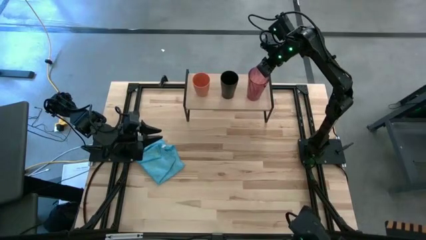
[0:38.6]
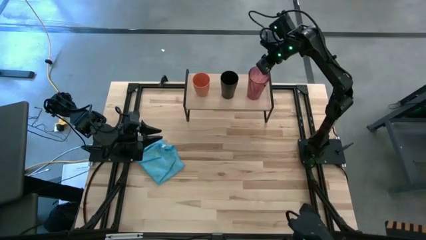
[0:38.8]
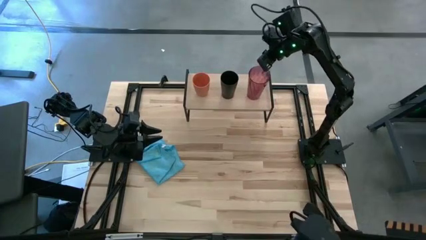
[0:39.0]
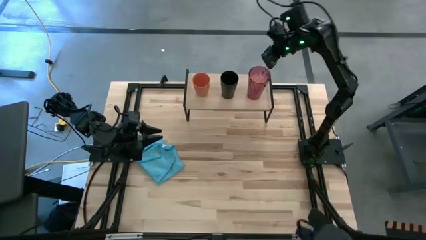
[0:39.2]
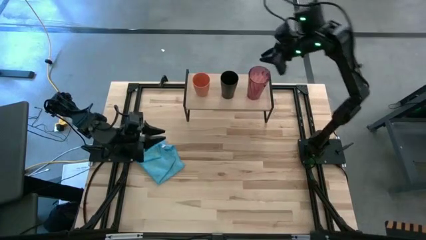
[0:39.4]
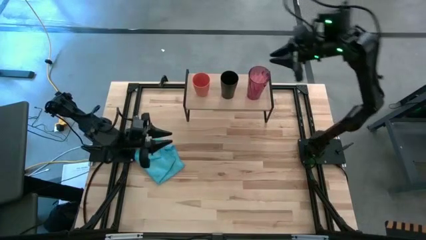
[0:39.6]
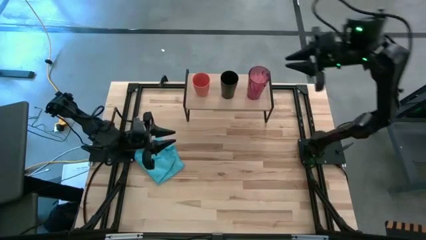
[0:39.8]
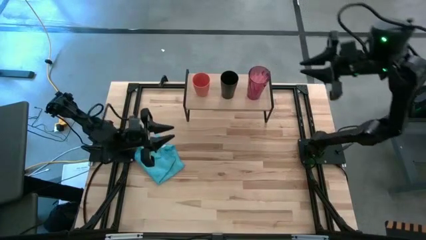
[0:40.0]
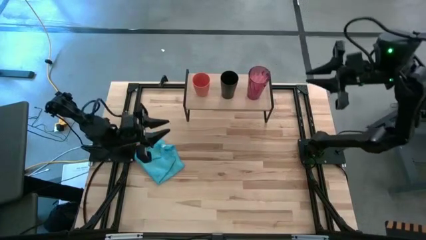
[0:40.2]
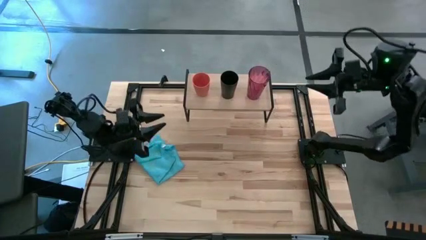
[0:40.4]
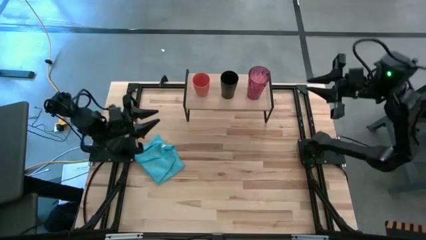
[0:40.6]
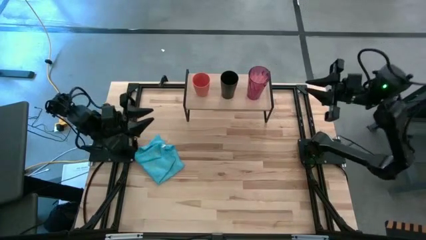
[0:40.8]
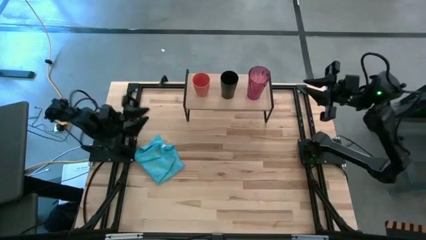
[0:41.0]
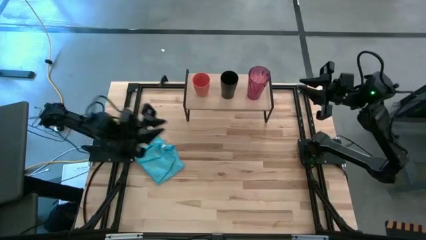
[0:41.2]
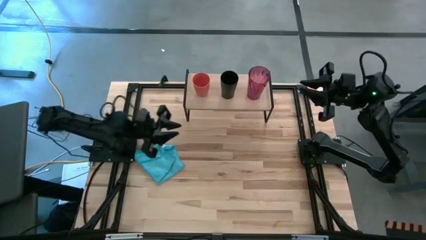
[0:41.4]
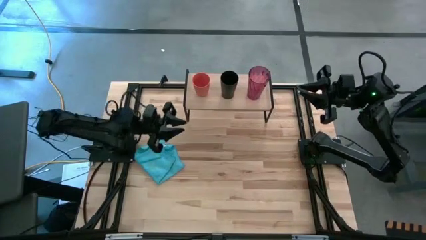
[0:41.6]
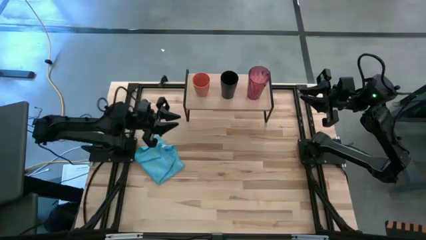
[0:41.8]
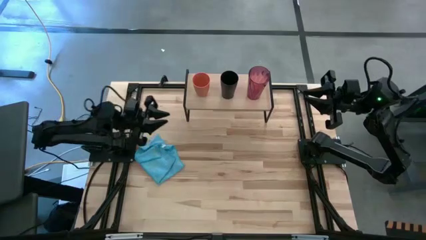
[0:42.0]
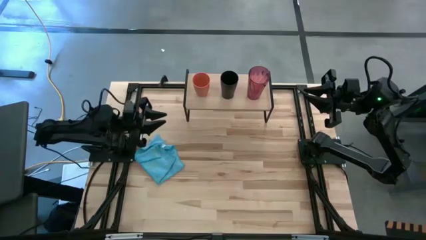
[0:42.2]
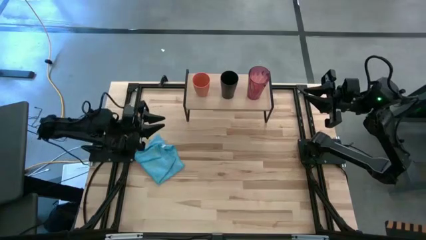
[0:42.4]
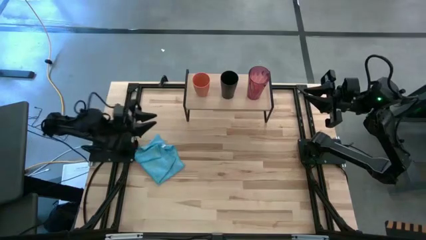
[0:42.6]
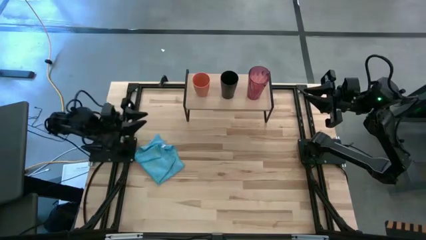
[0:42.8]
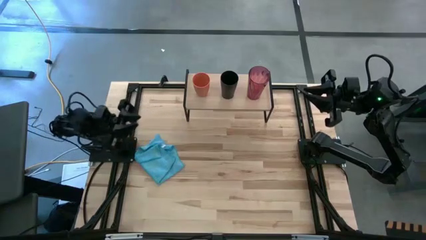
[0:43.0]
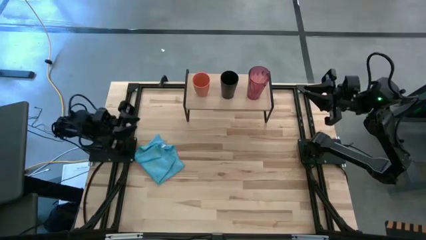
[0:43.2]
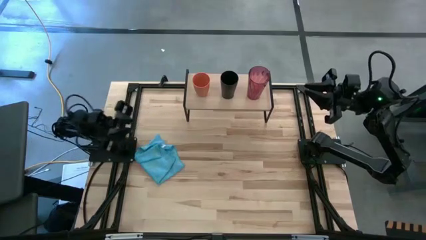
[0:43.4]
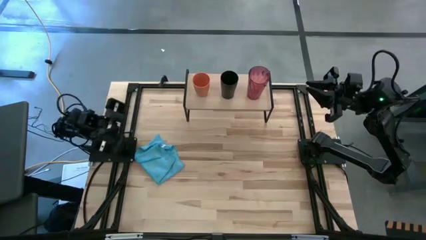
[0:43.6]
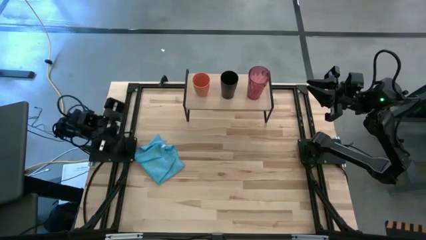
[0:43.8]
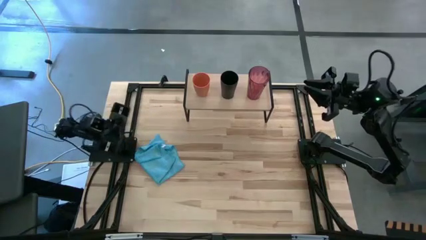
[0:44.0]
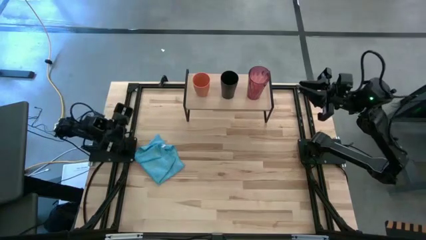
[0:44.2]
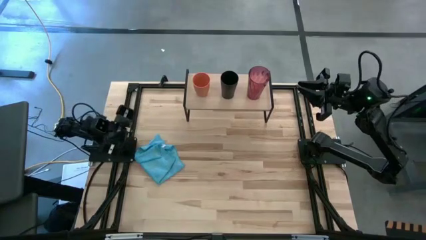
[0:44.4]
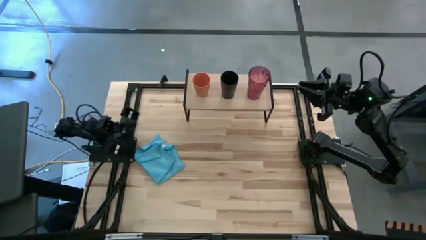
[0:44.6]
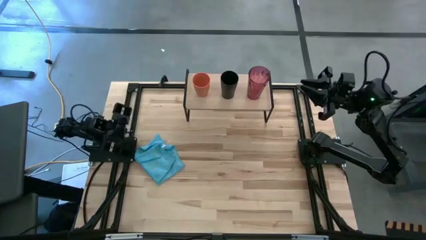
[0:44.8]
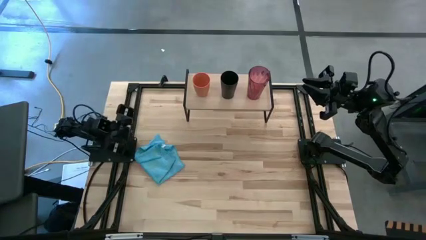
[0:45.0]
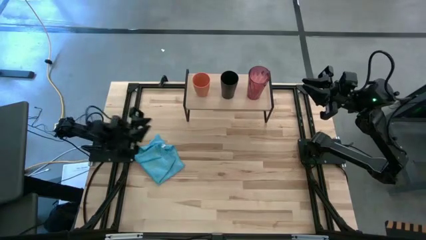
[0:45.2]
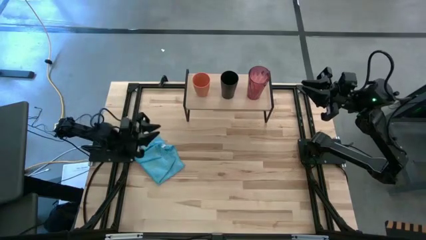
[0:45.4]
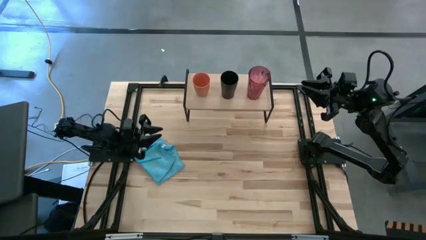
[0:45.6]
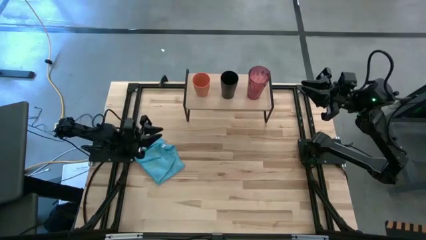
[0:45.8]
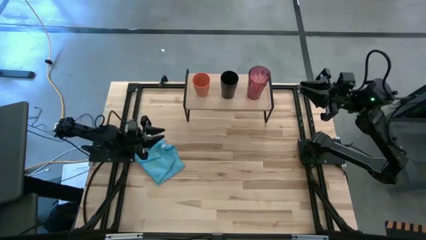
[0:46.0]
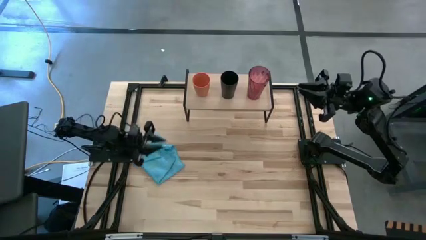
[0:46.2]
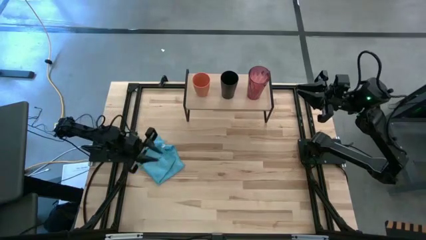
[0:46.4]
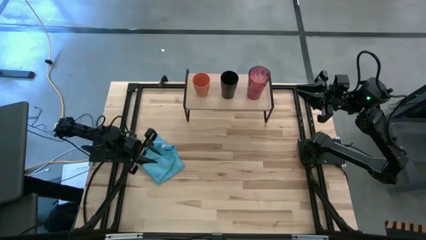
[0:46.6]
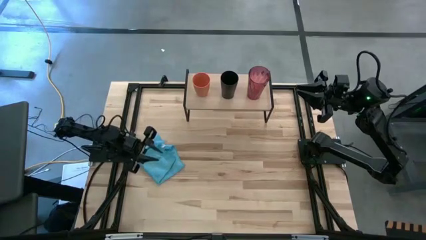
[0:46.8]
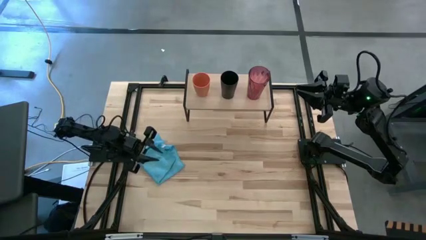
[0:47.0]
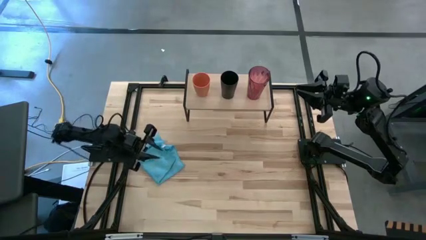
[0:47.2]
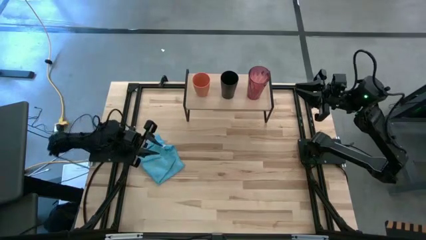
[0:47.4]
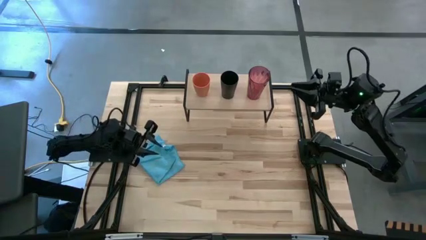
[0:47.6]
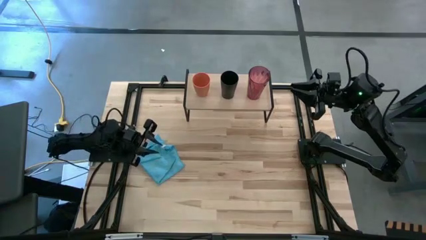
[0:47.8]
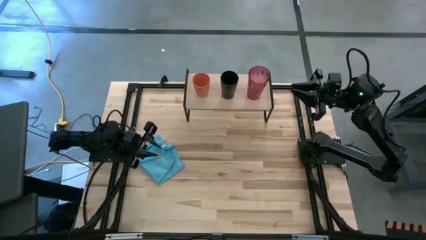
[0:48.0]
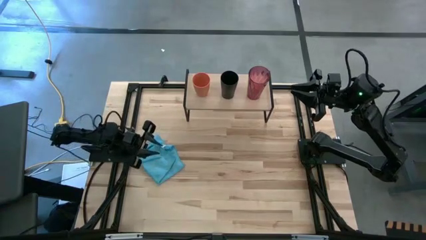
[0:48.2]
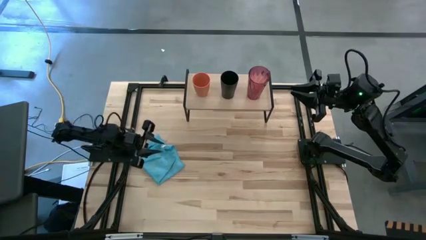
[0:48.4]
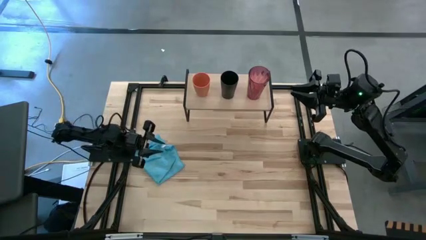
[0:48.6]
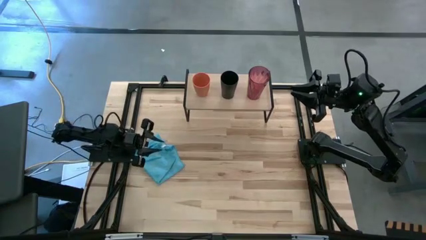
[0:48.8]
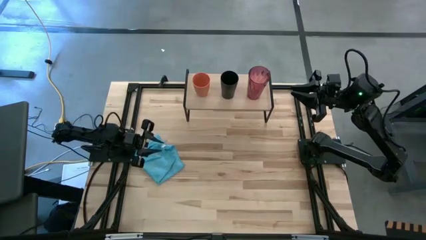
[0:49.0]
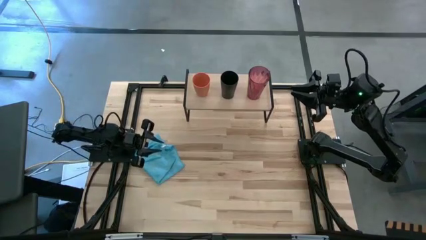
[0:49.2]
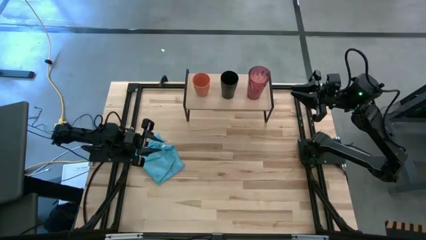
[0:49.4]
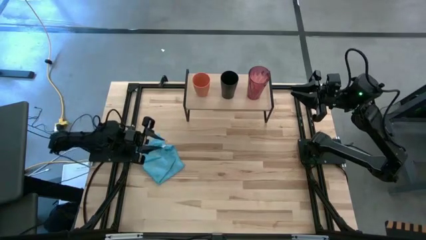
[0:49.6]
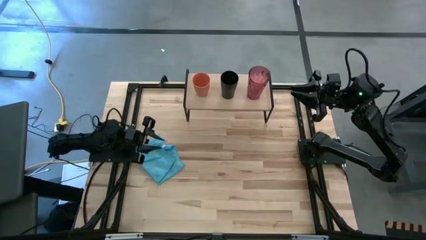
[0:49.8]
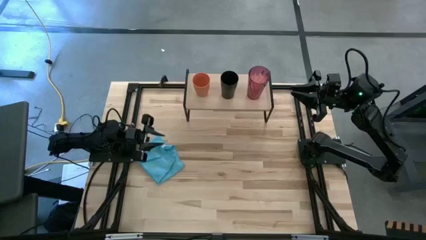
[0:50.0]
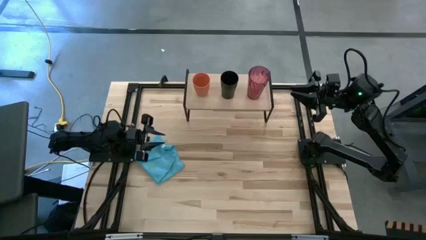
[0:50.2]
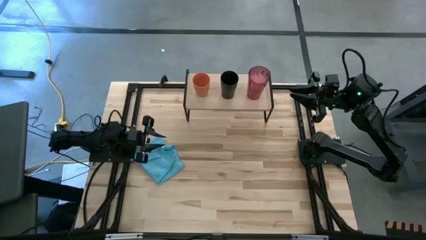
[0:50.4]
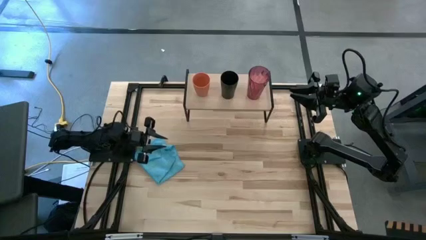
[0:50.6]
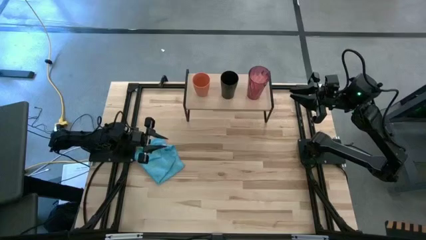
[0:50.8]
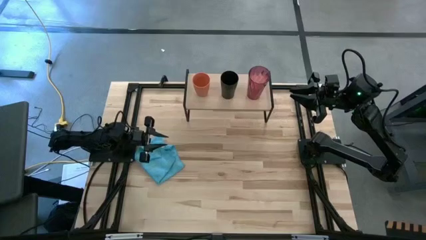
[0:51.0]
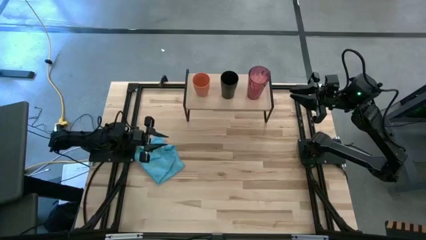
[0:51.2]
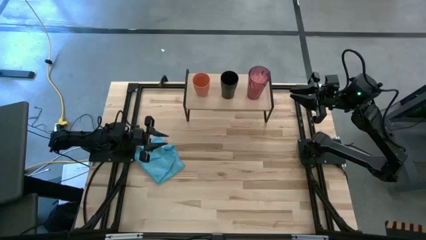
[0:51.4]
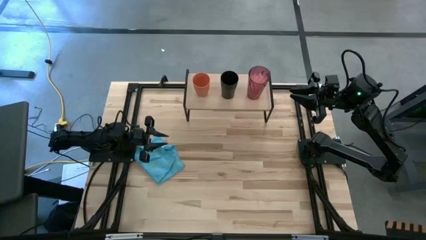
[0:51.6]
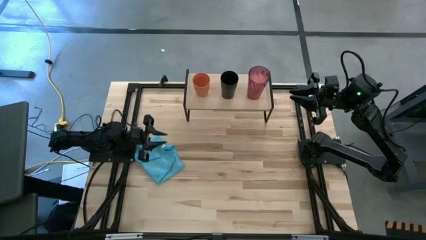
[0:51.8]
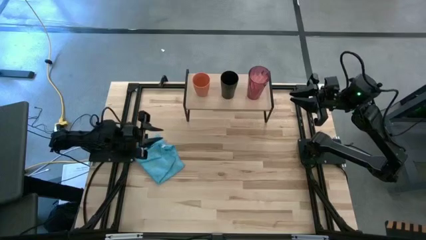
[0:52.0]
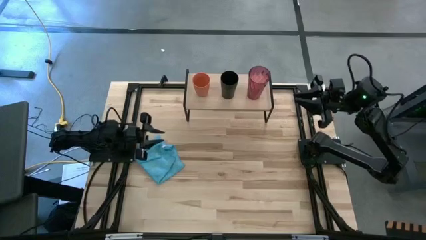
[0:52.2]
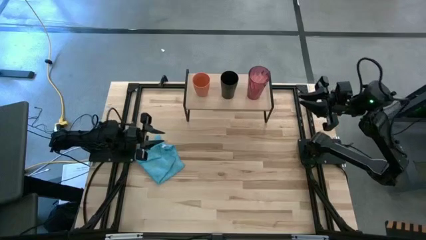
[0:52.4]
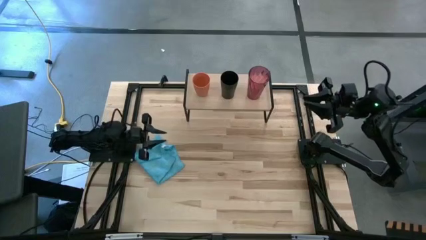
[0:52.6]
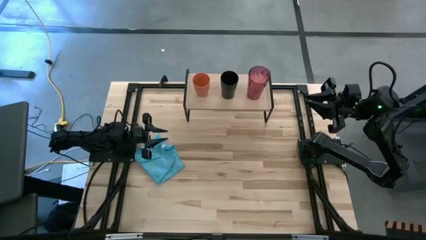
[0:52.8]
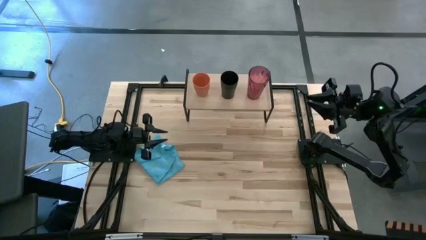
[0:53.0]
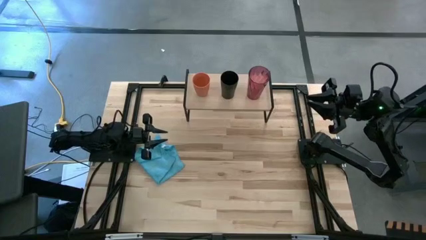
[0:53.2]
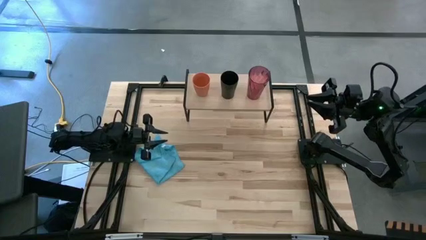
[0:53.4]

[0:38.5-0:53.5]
Task: Stack small to large cups/mugs on shelf
Return to Home Position
